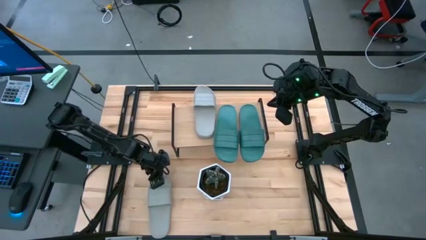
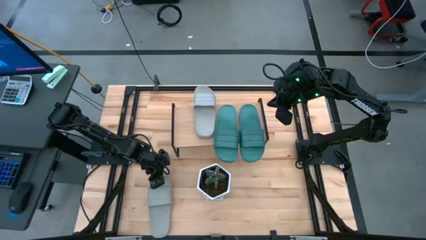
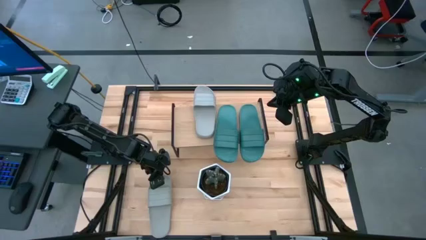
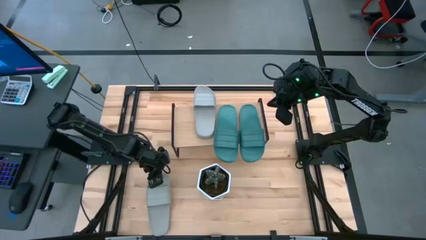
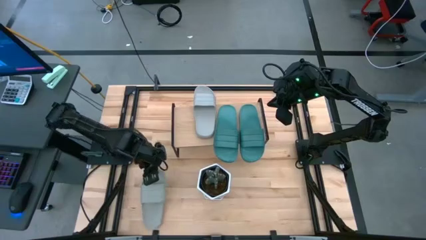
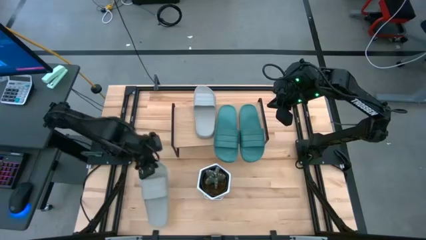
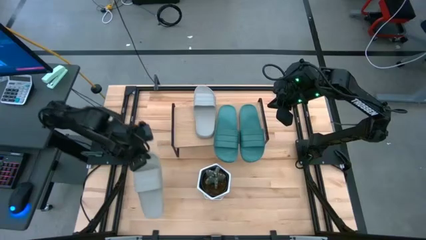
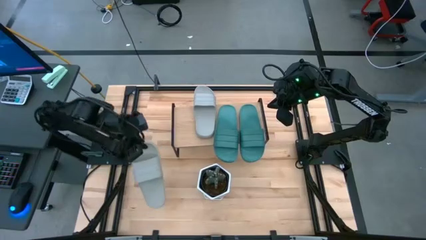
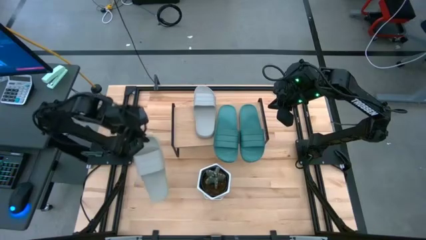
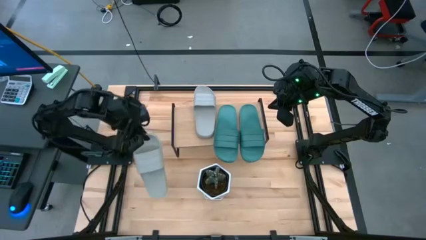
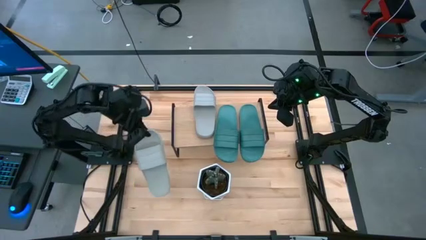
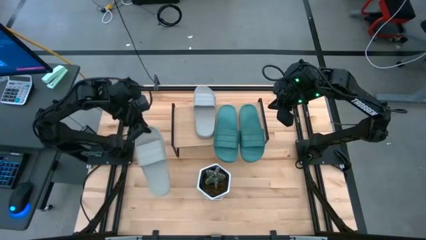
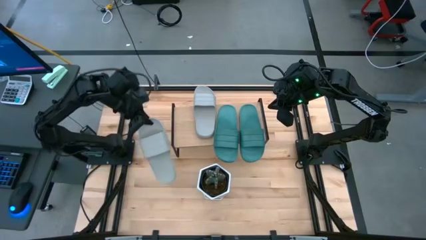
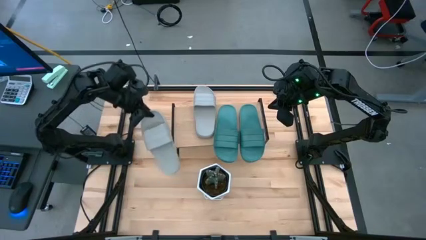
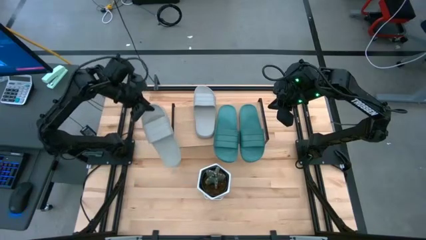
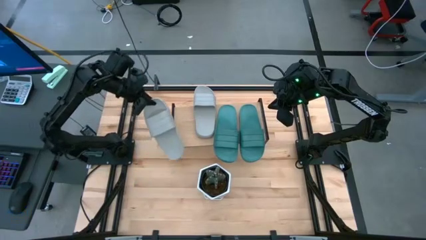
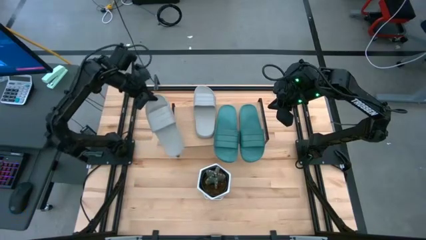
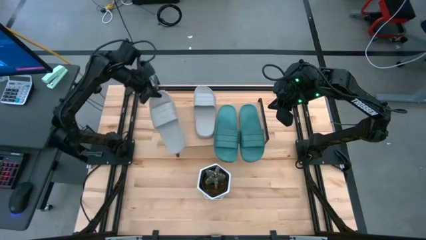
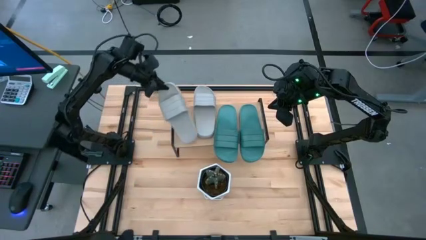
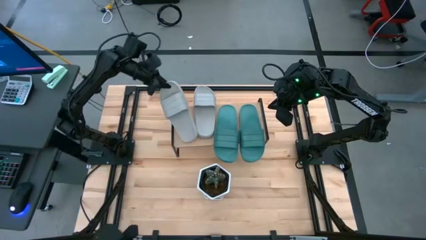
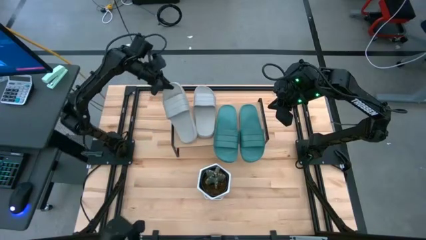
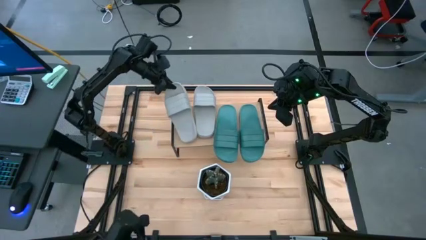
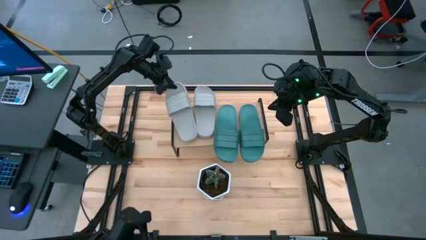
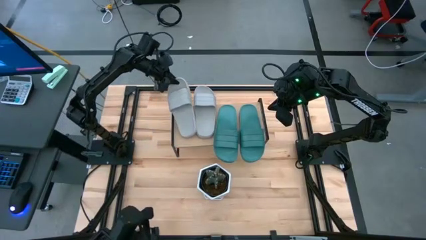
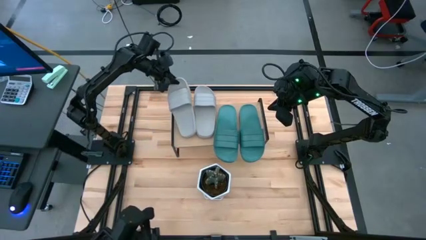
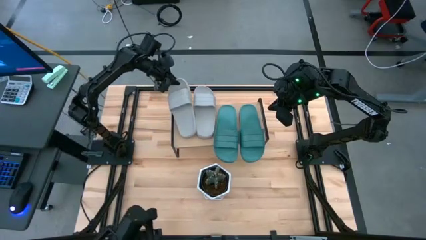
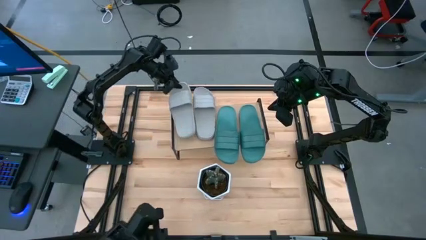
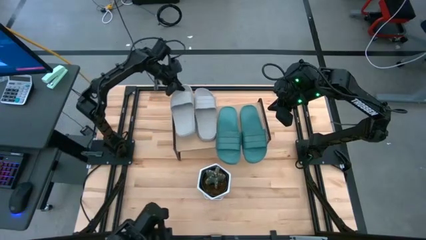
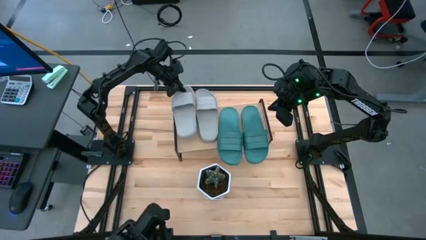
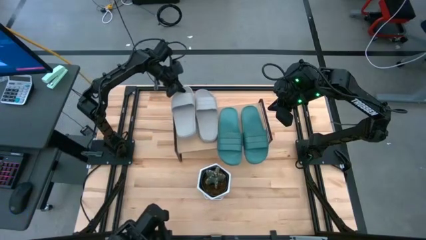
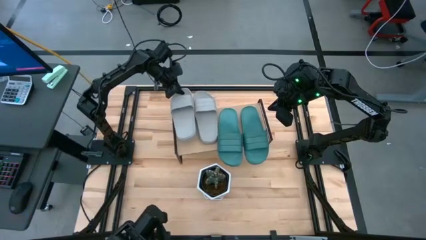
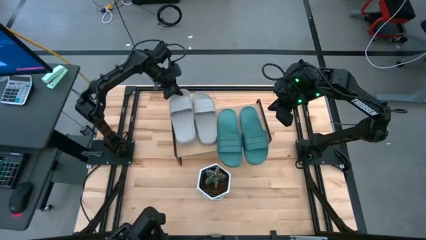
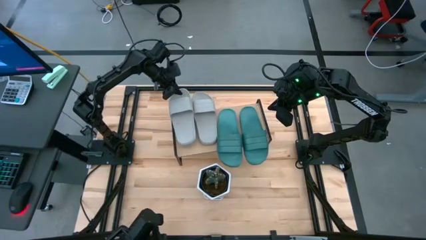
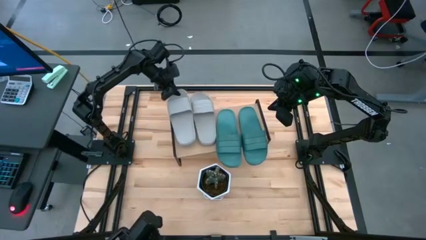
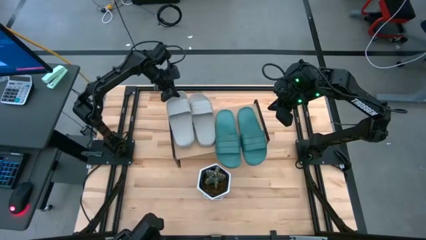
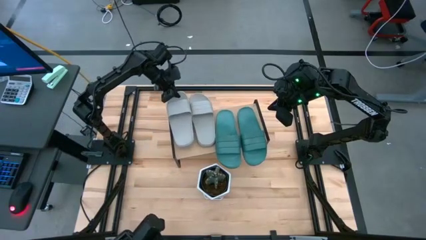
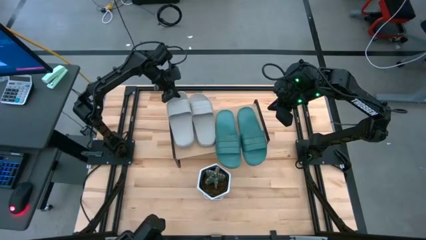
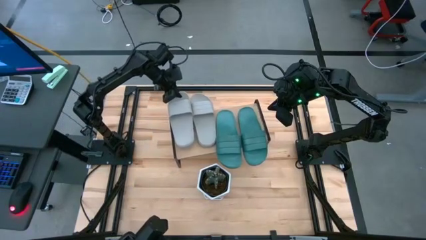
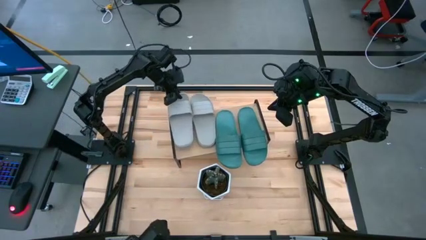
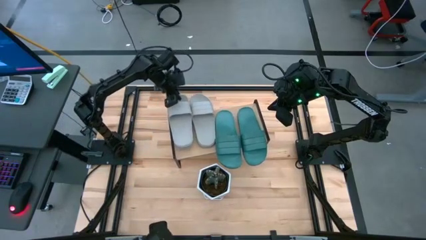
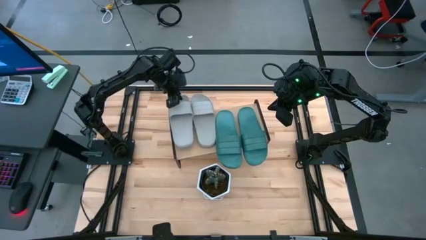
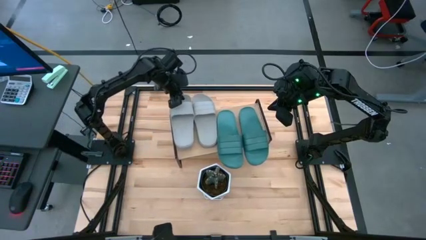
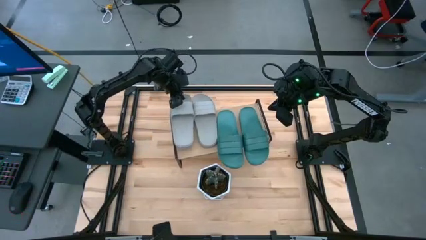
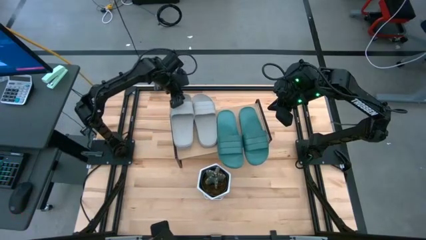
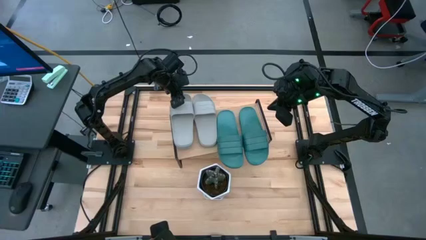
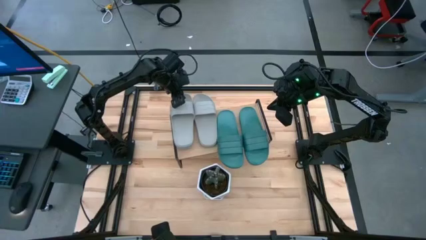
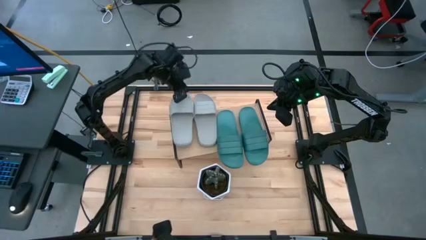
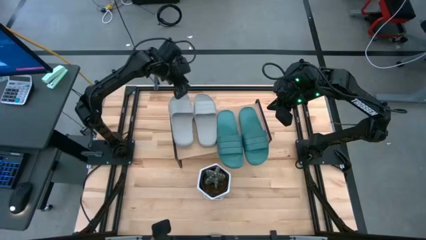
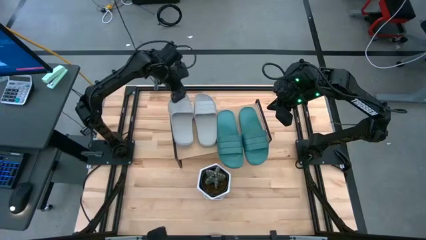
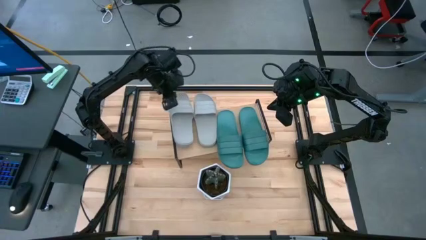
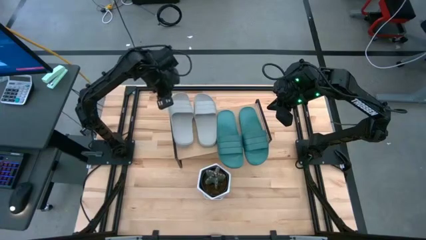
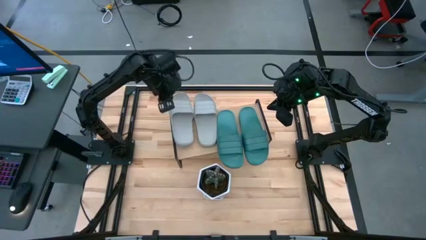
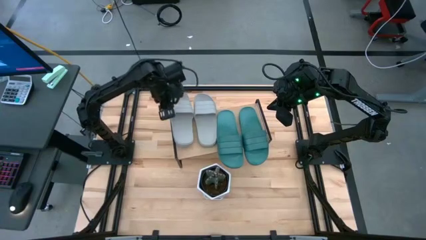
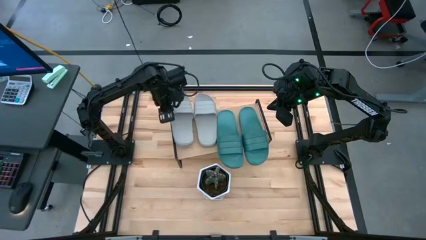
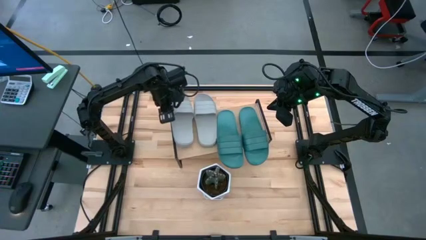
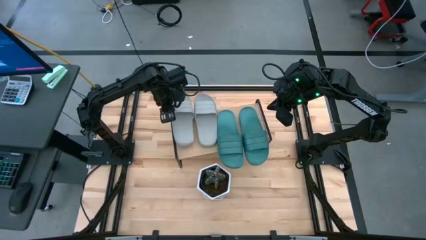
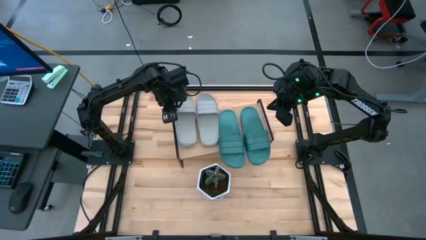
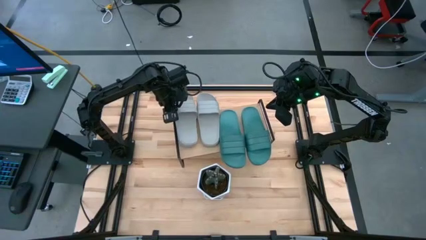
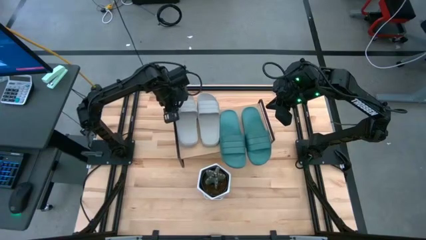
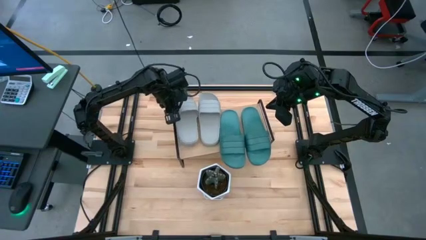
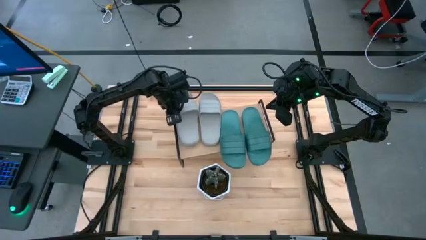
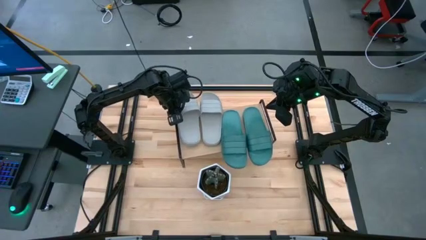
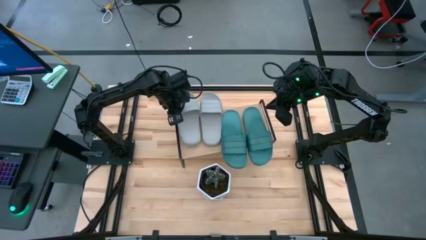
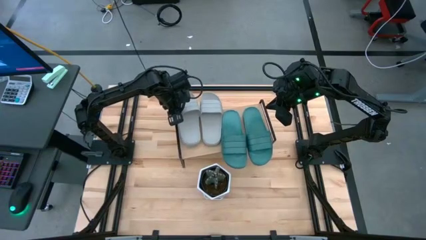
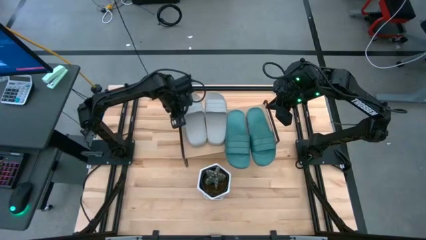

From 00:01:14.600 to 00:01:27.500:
Task: Pick and place slides into the shelf
Put the gray slide on the shelf

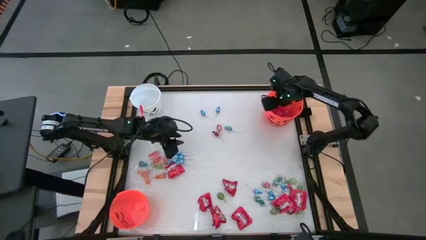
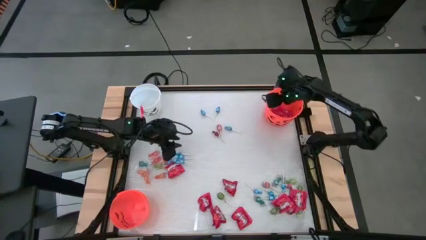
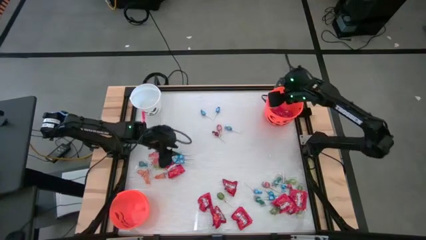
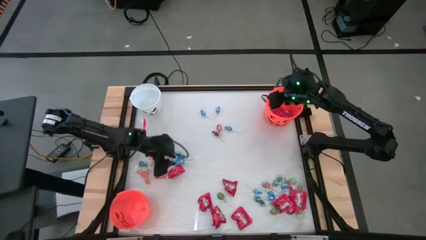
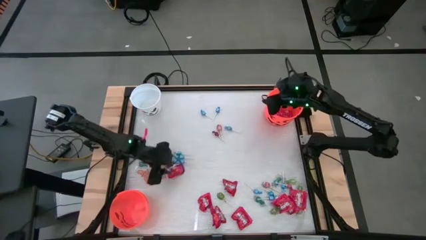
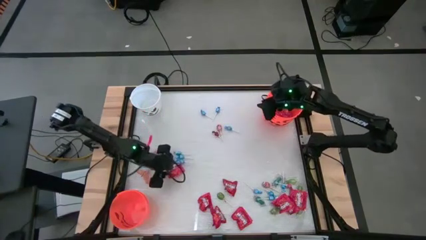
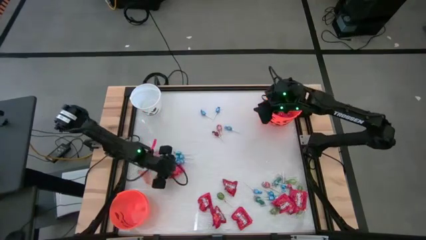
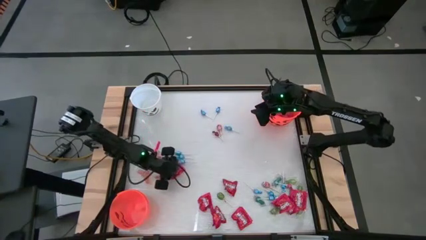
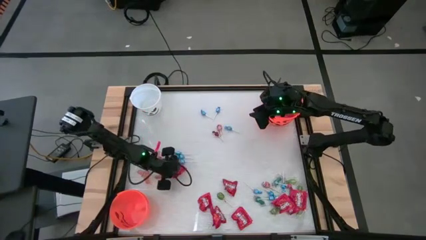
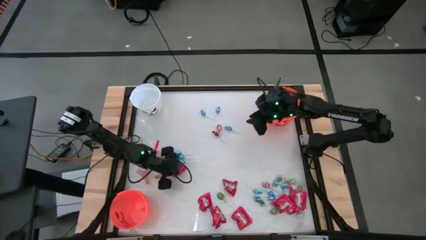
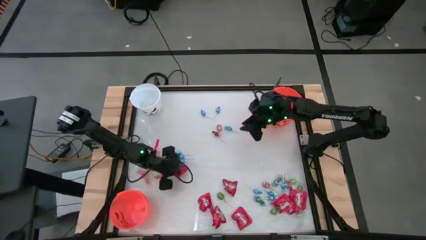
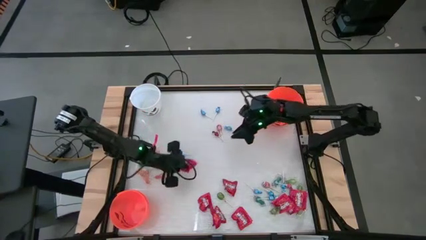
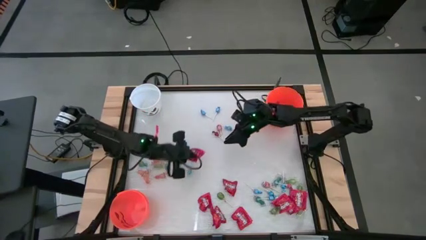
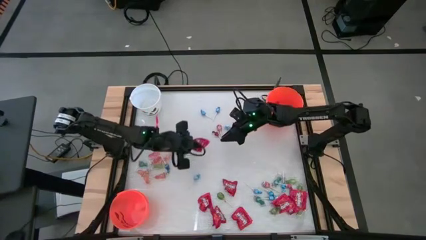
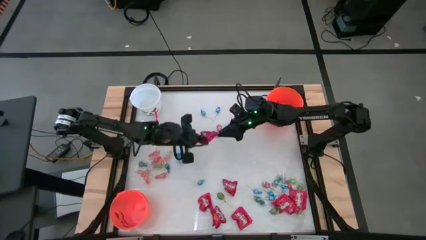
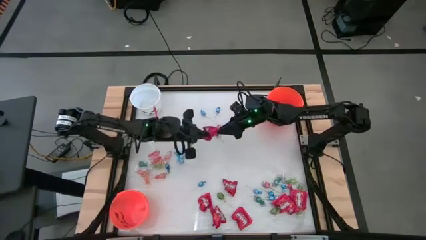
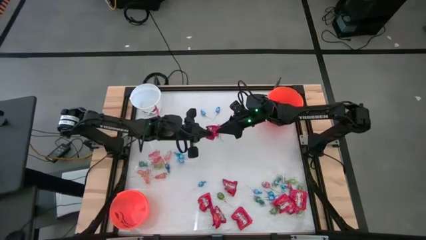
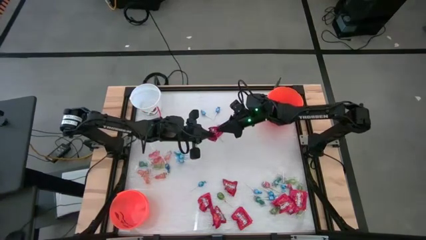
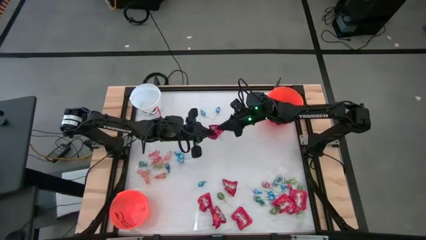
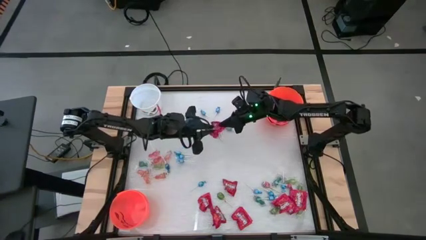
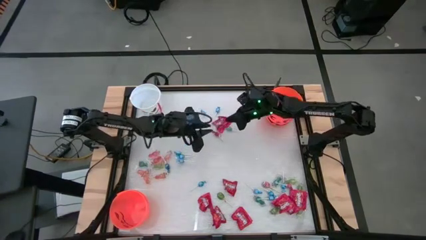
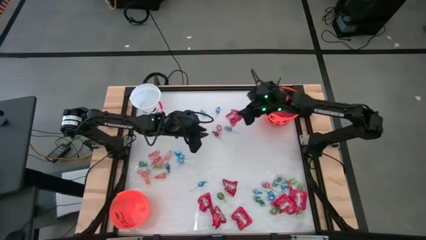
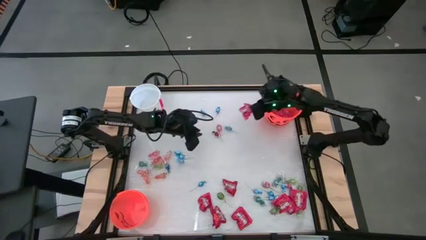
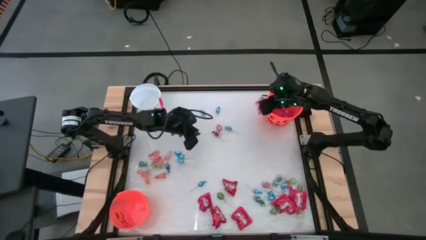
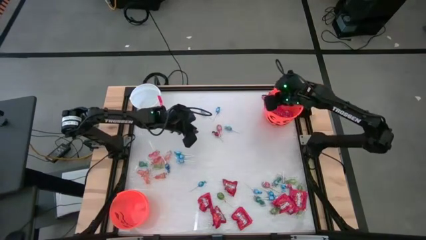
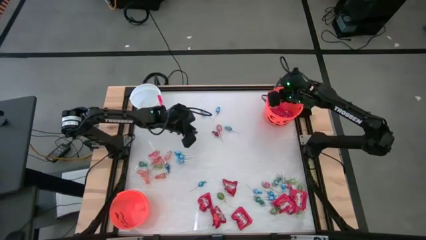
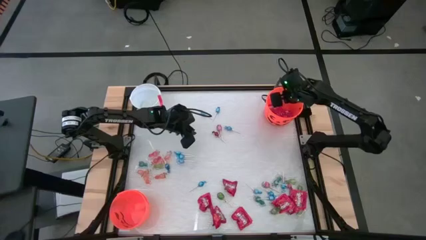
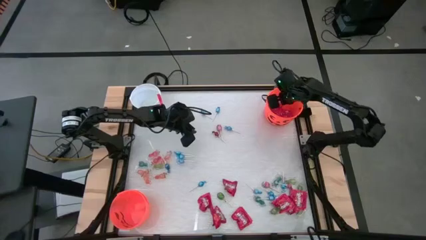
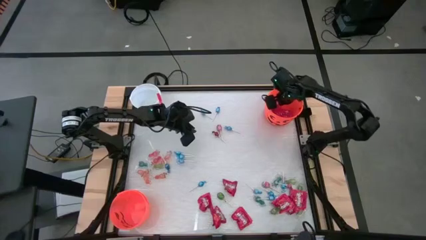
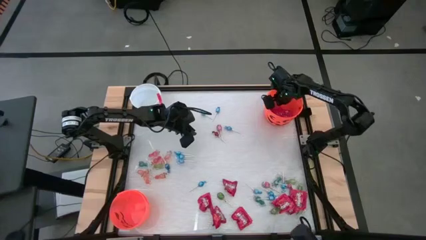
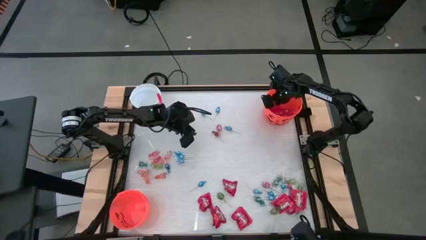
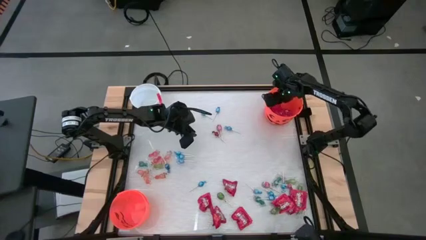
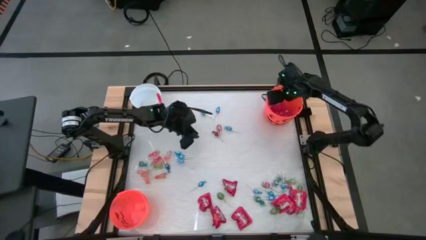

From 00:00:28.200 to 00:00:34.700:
Task: Sort candy by brand, put in halloween buckets
Put the red candy into the top orange bucket
